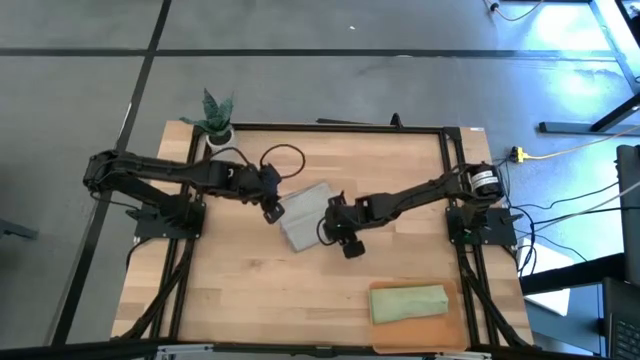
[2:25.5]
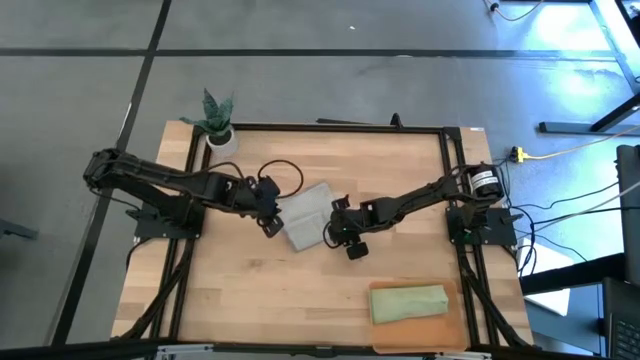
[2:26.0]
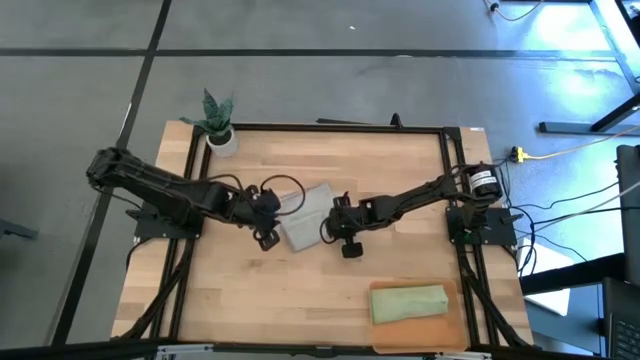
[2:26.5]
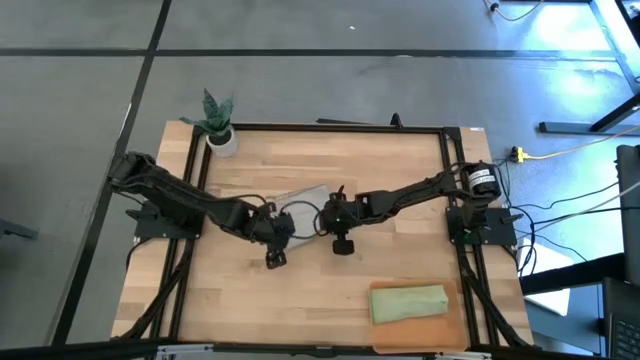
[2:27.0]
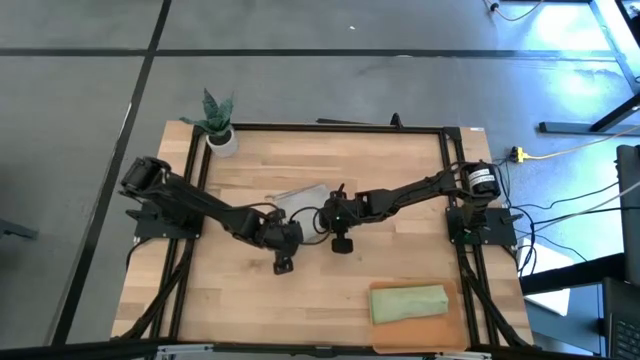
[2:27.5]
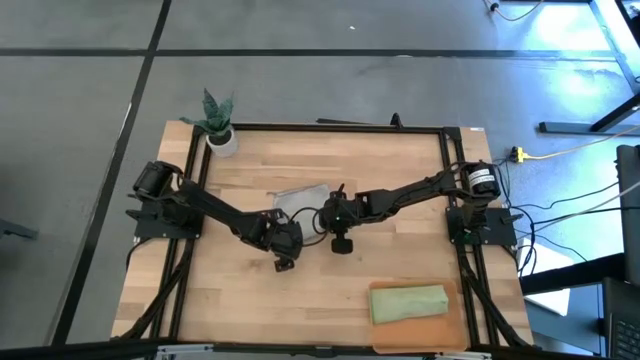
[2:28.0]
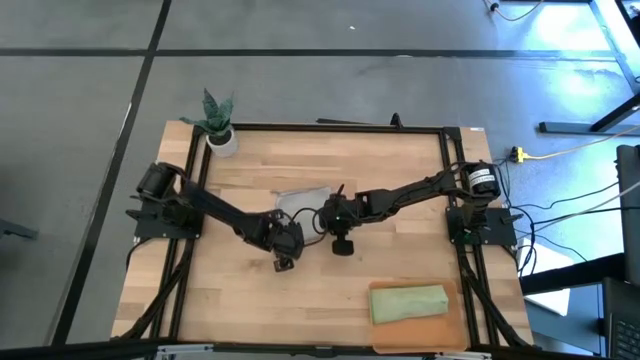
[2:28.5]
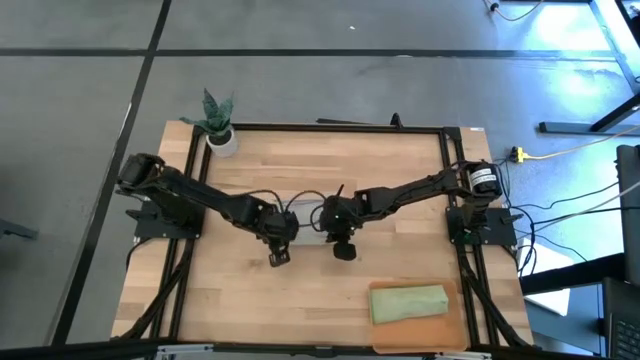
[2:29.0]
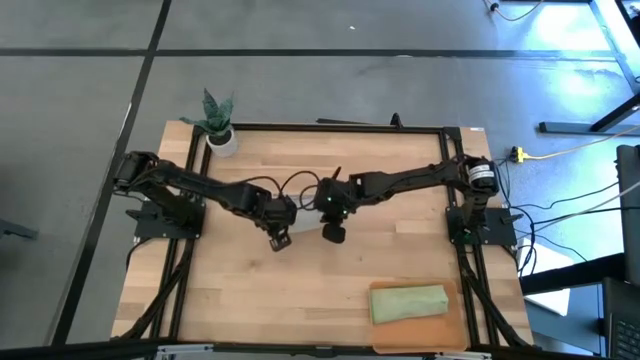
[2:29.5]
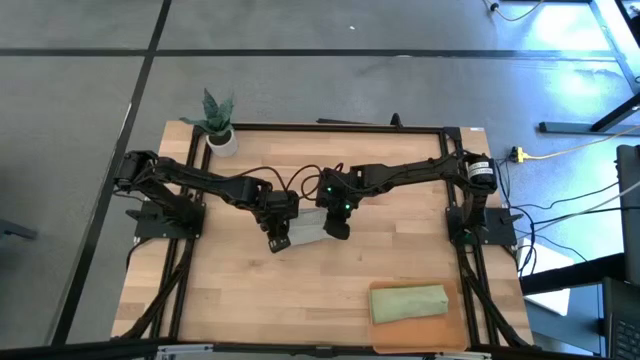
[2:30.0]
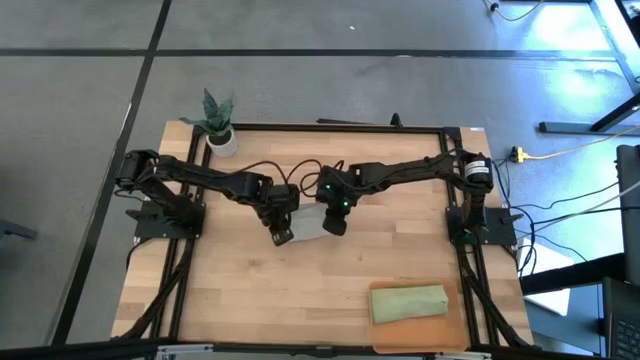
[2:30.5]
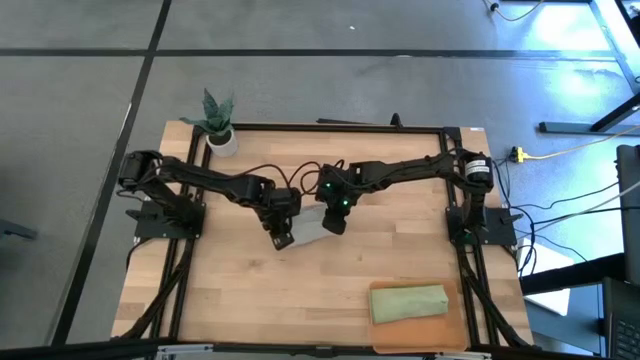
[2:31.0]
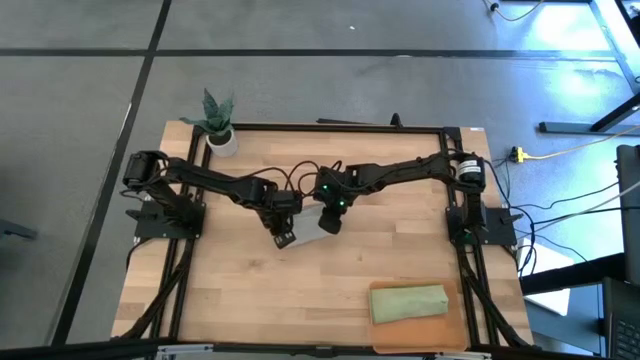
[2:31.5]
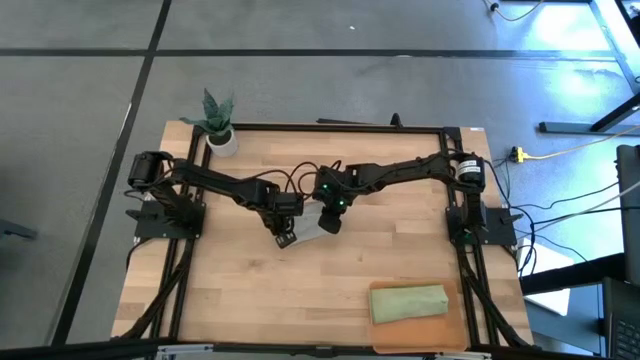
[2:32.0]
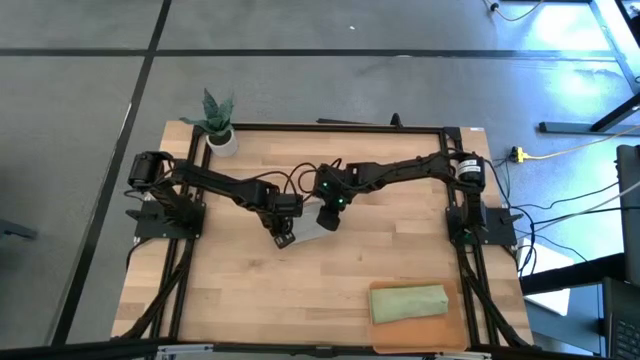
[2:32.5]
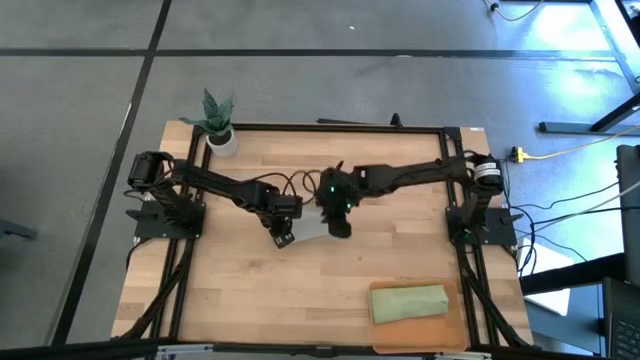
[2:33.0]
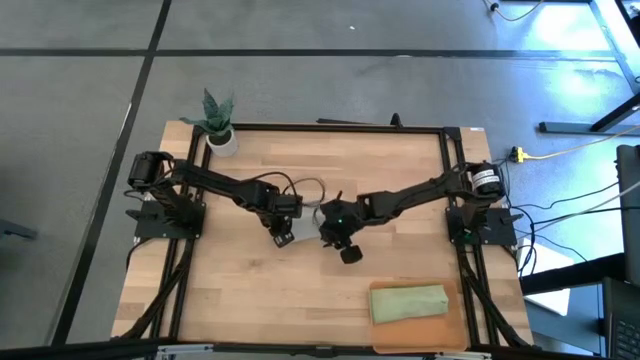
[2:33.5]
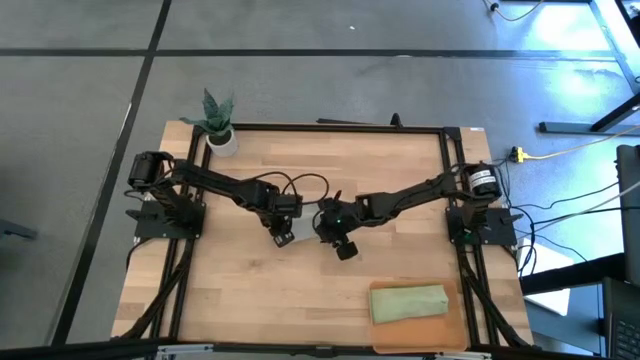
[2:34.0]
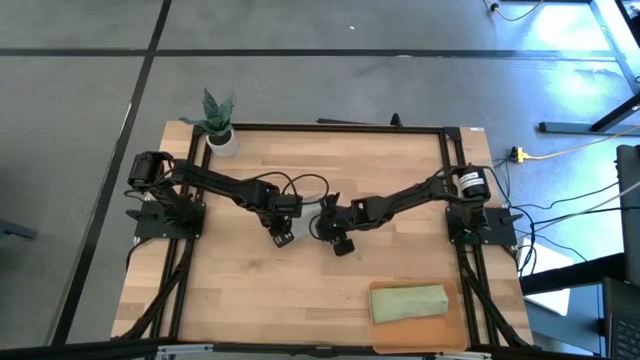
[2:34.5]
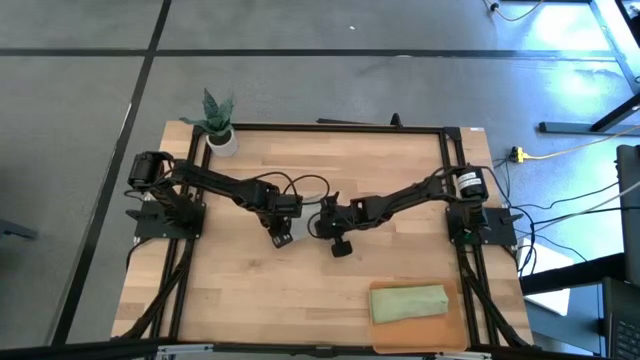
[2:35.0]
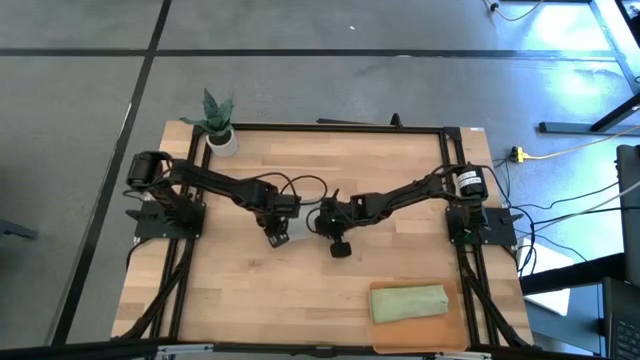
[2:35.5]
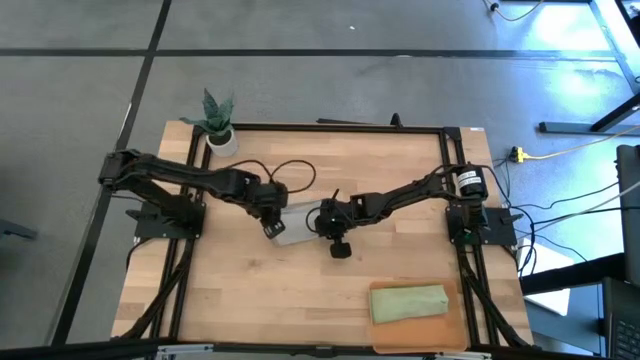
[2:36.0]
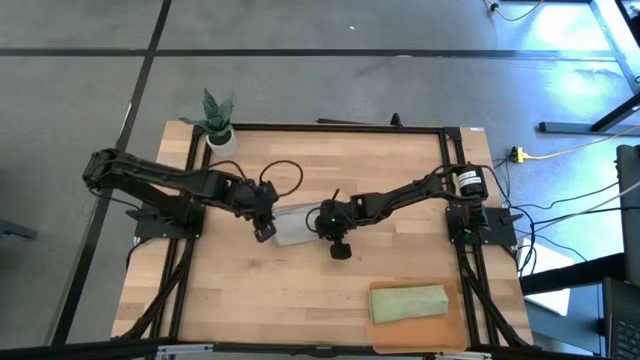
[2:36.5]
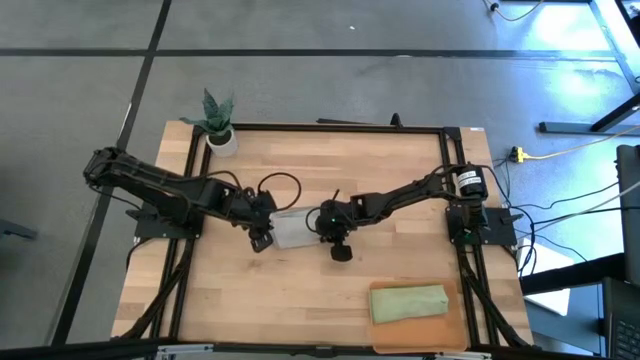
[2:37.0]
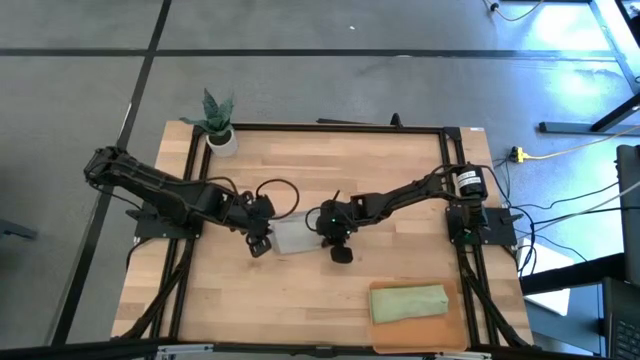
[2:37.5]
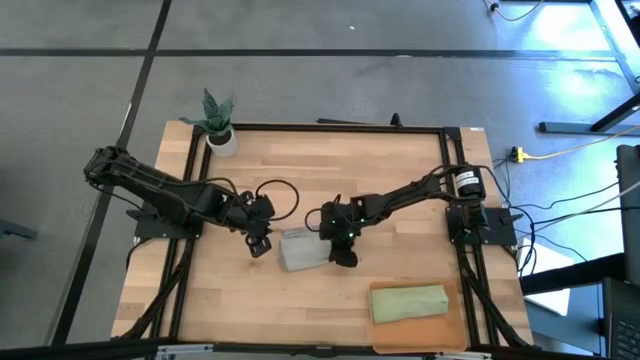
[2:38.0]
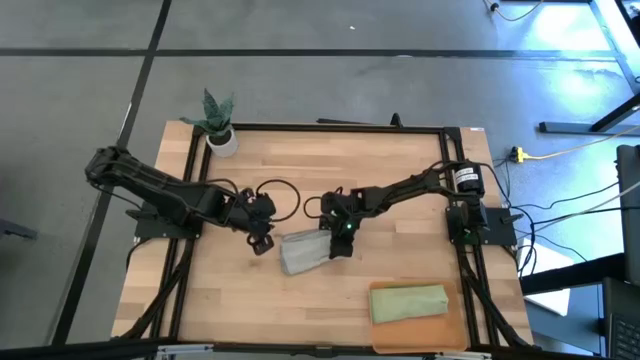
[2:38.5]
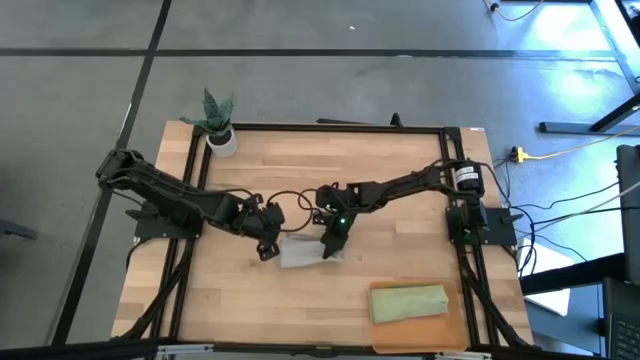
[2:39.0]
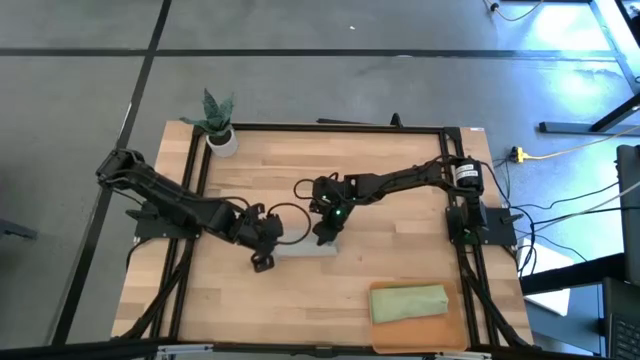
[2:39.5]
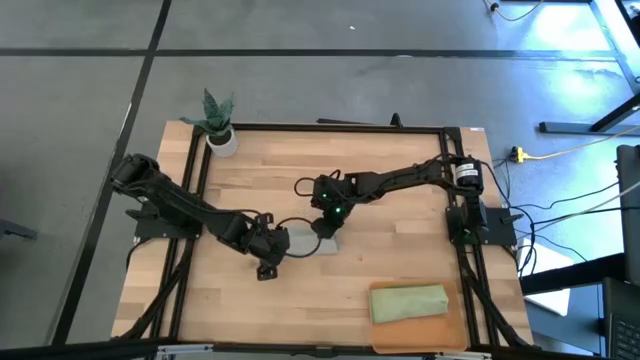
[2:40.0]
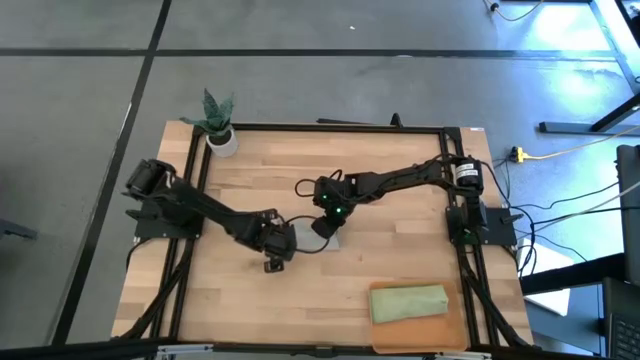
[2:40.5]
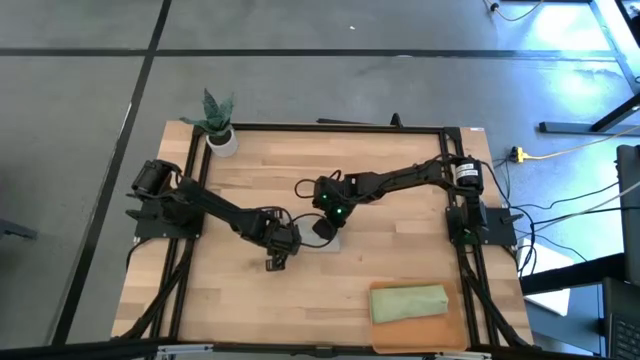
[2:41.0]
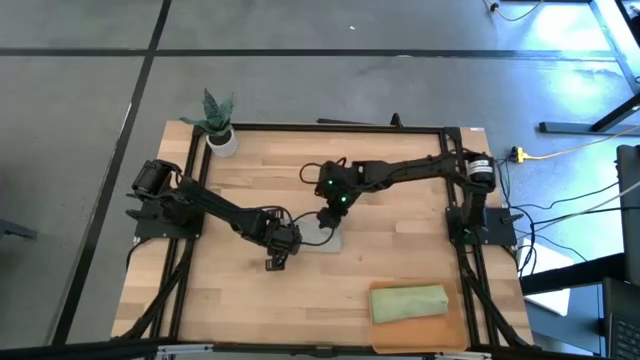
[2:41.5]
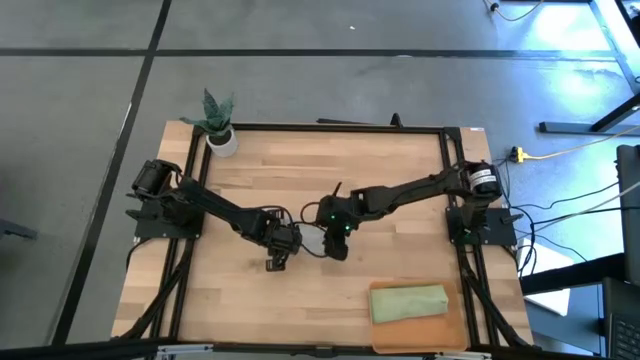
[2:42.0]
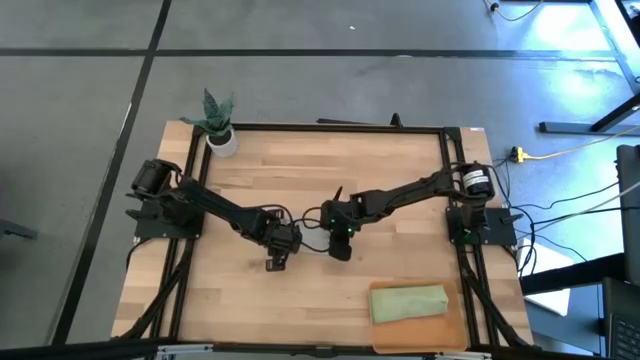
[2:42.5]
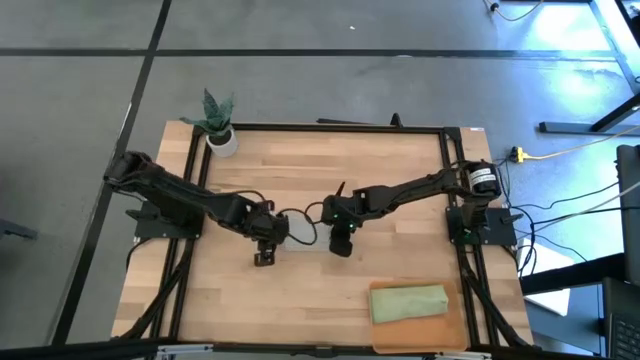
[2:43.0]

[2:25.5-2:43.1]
Task: Roll microfiber towels into tight, uniform cylinder then place into a basket
Roll the gray microfiber cloth

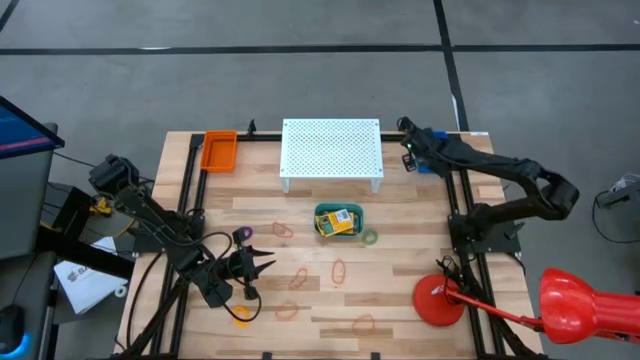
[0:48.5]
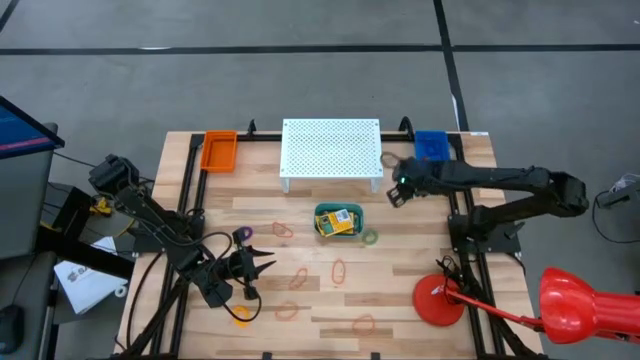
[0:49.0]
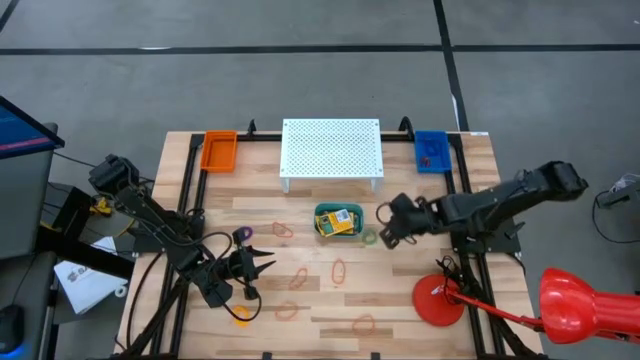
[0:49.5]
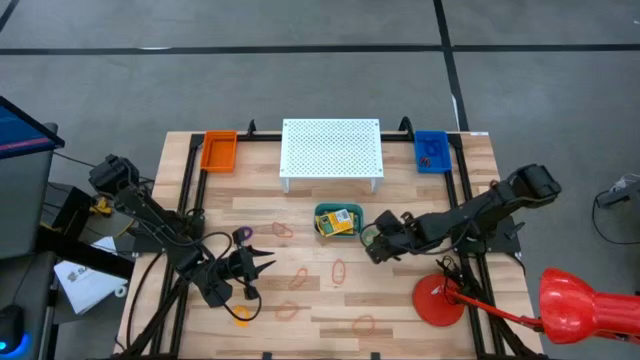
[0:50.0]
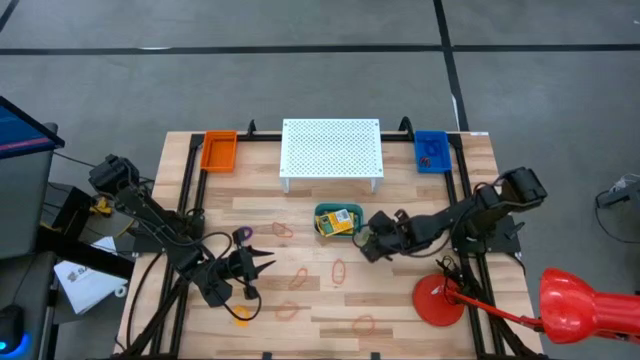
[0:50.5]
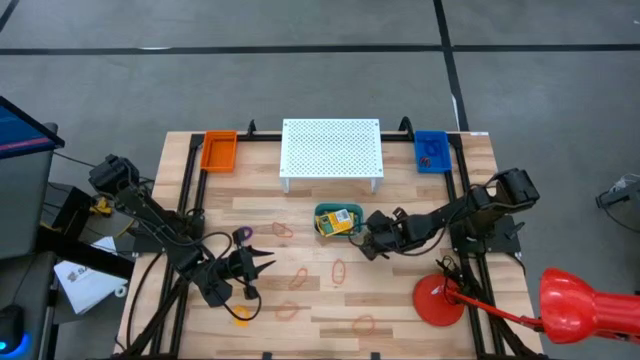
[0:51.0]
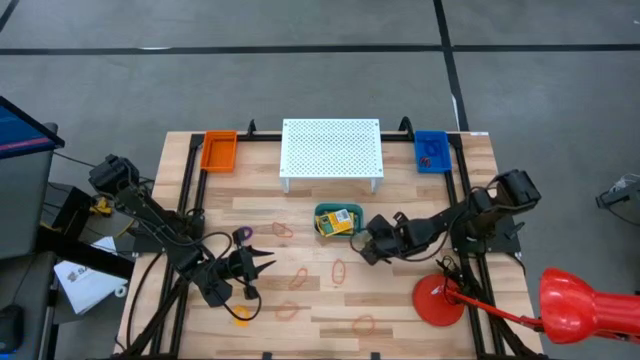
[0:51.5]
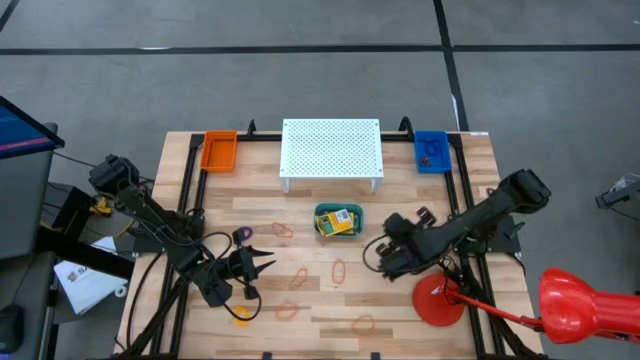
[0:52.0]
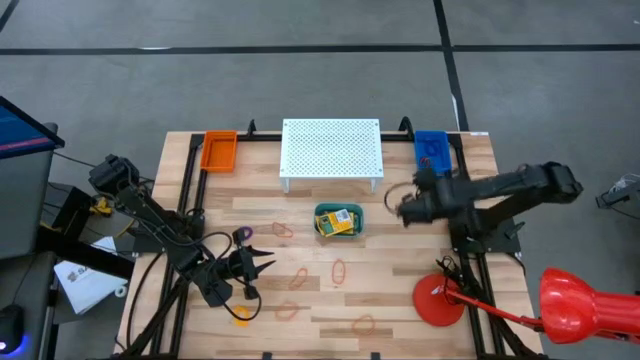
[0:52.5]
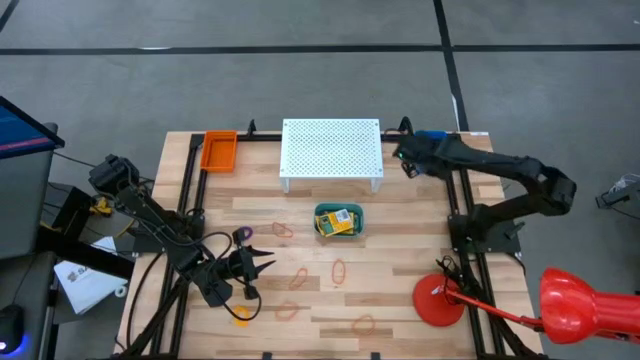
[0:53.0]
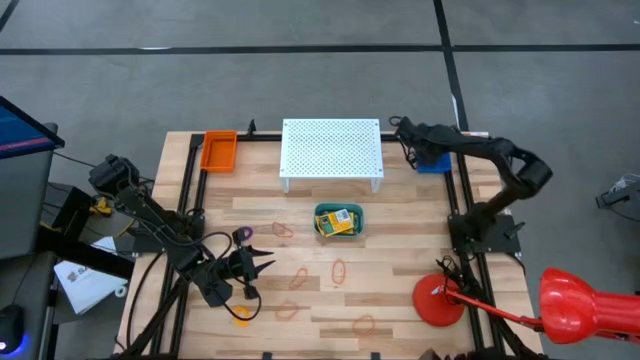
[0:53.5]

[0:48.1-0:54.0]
Task: Pick & Place Office Desk Supplies
Put the green keychain into the blue bin
